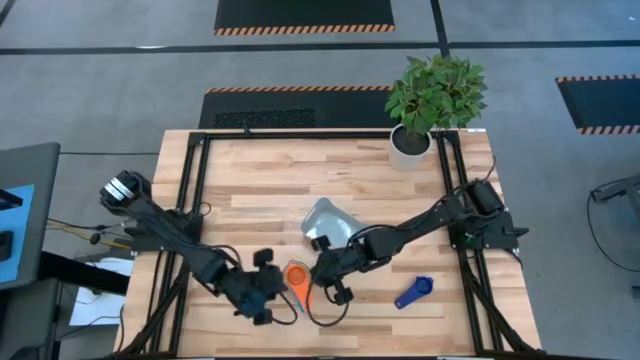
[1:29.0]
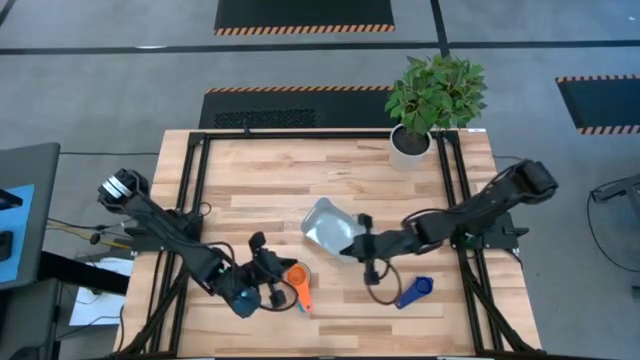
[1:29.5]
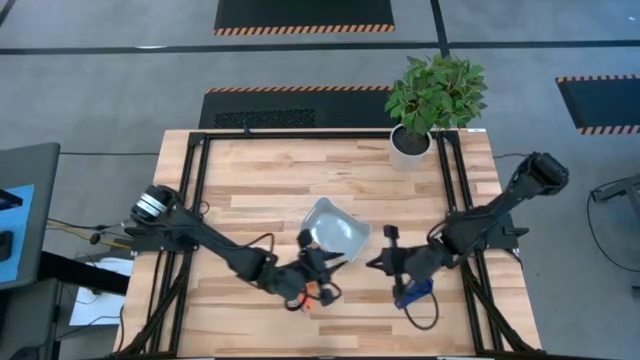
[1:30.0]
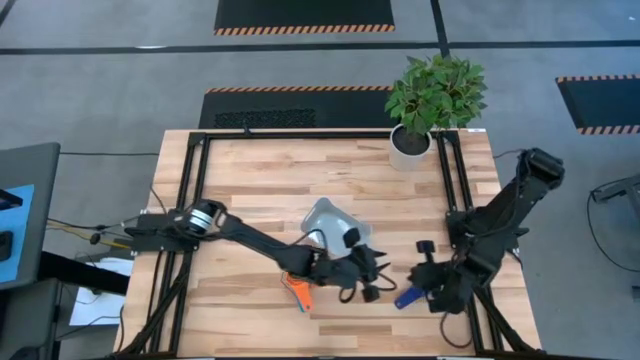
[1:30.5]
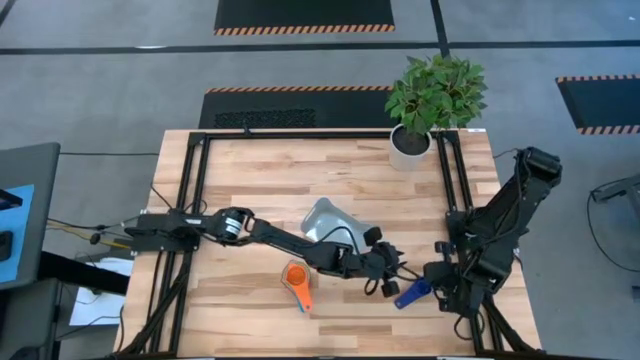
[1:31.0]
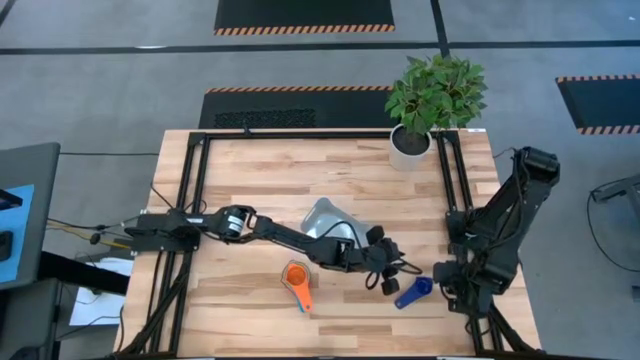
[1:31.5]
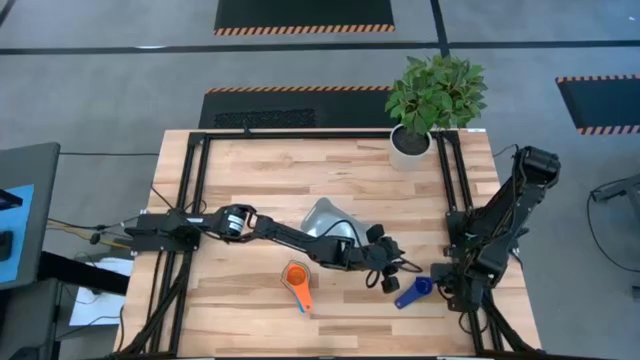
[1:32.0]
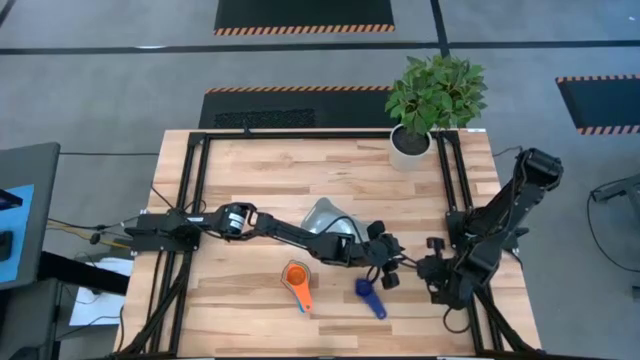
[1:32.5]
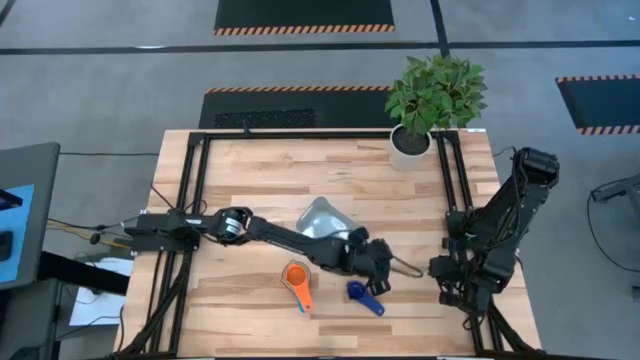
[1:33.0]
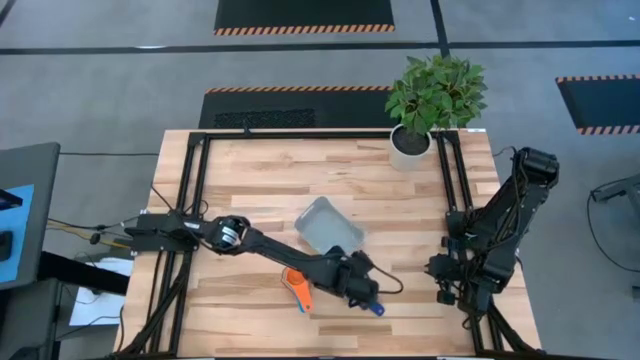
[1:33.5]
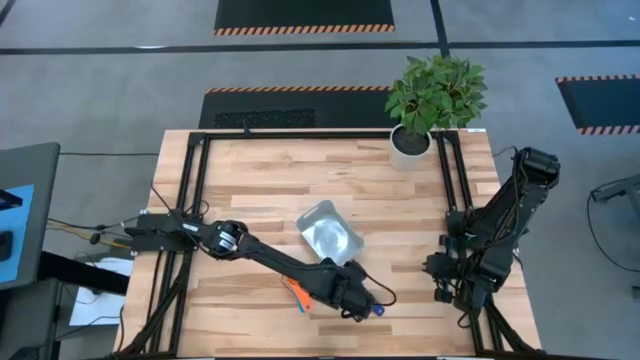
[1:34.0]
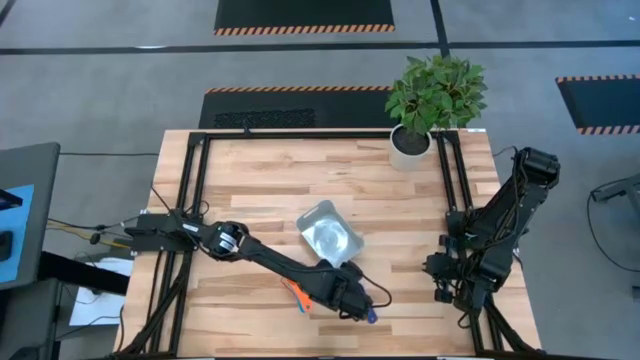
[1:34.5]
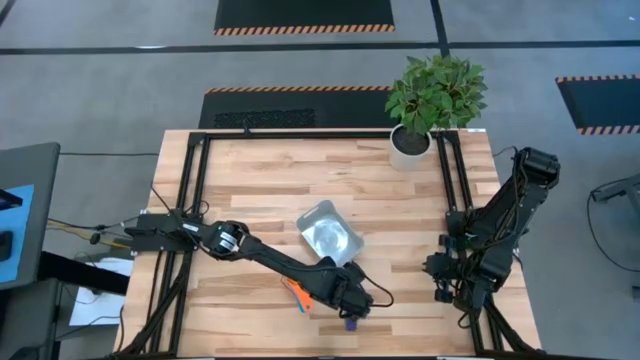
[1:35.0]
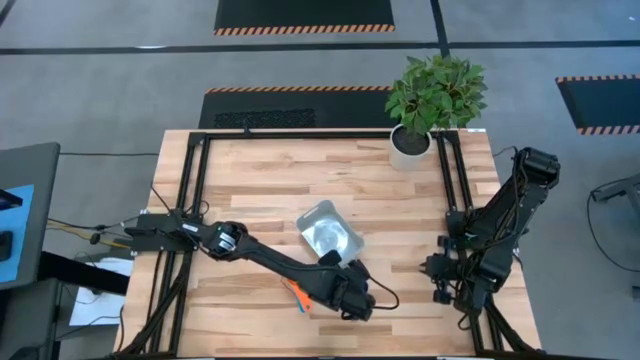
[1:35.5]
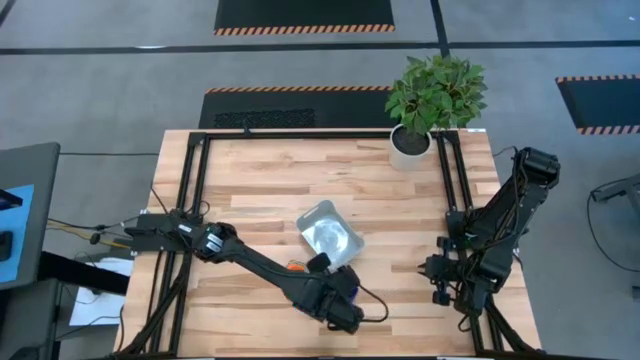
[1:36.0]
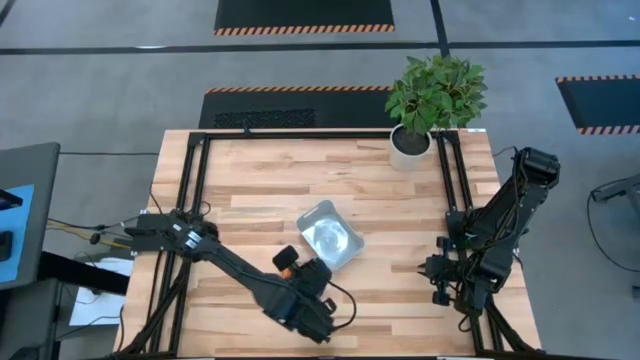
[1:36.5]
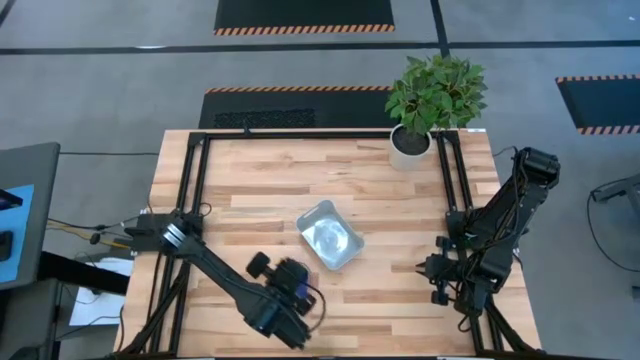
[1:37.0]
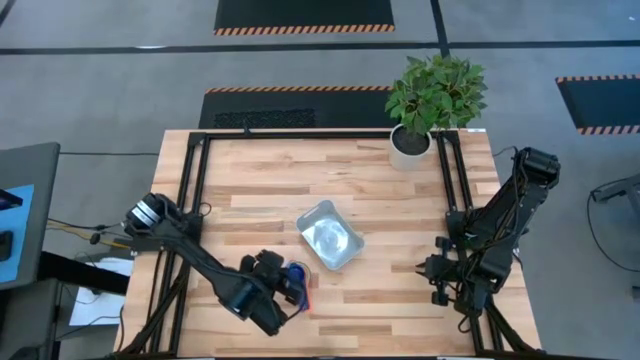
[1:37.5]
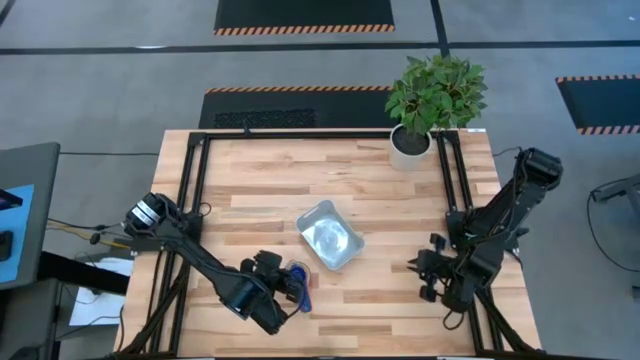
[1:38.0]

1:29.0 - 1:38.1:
Task: Nest measuring cups in basket
Stack the dark blue measuring cup on top of the orange measuring cup

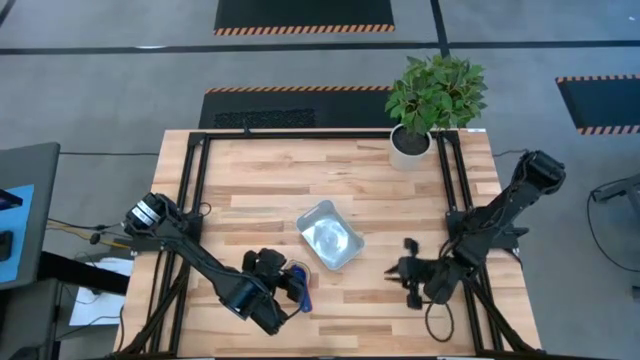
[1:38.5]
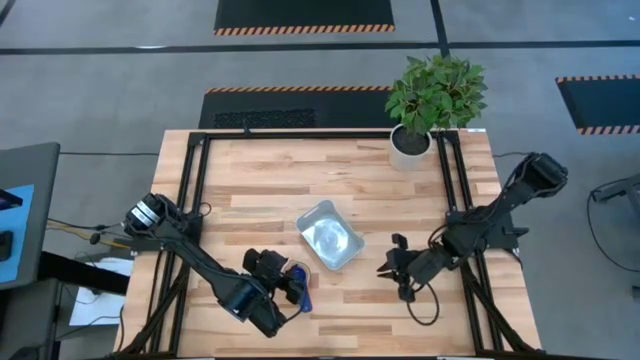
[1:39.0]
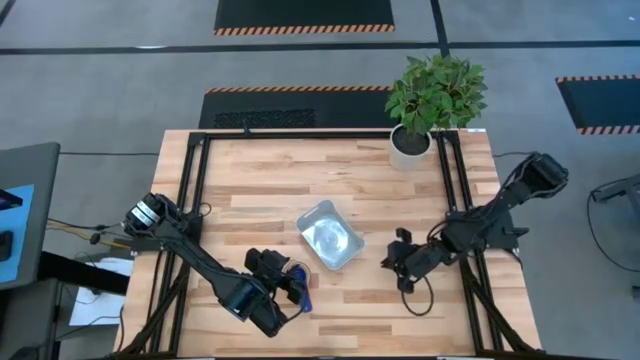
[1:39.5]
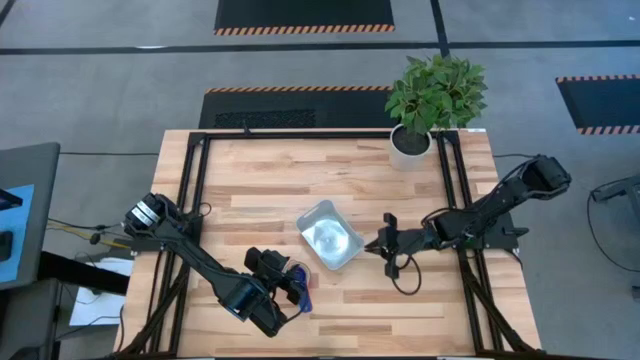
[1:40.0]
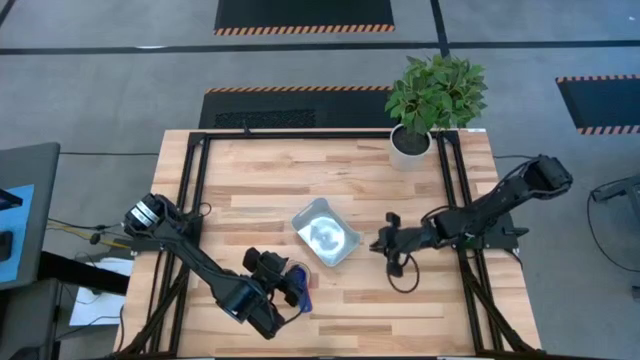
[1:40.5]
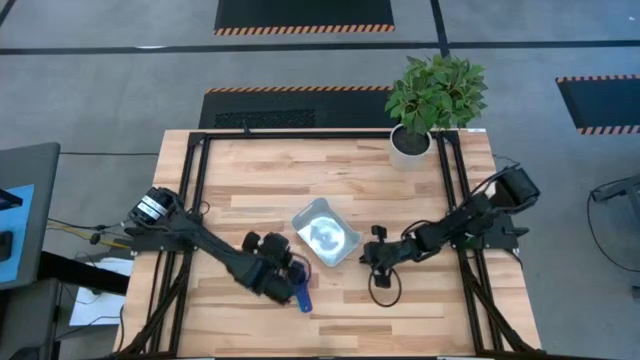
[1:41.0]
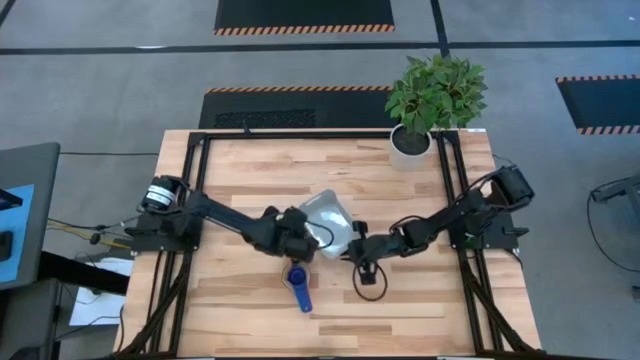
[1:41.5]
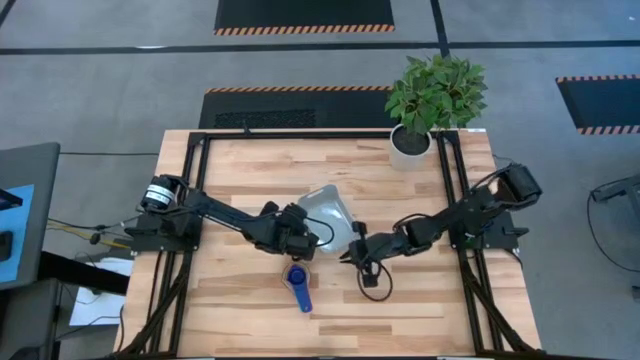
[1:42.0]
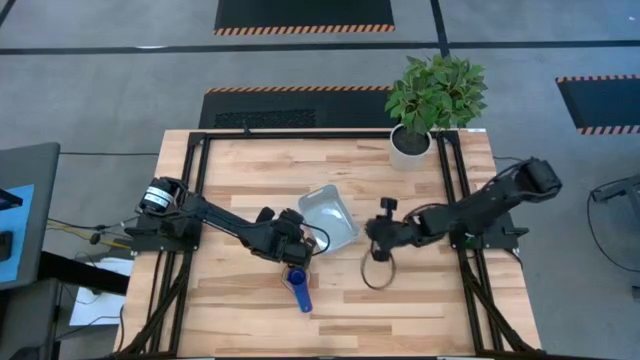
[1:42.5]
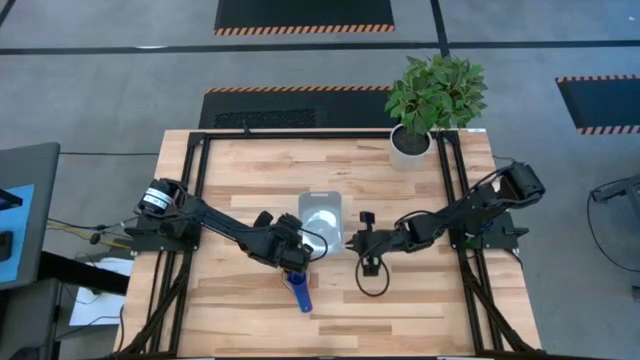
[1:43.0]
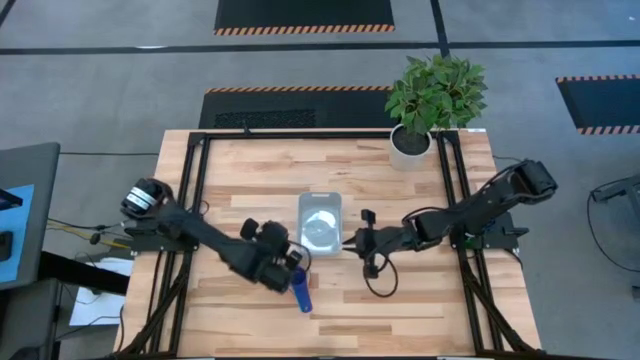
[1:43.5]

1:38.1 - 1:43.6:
Adjust the white bin

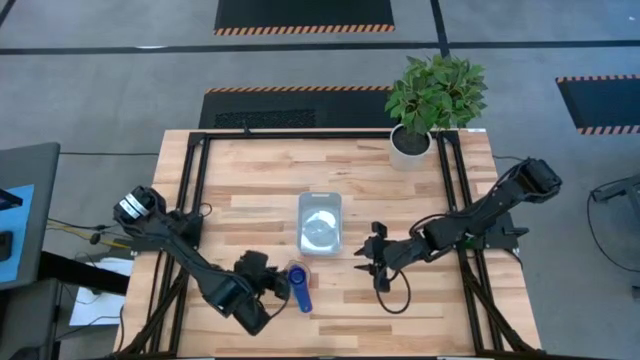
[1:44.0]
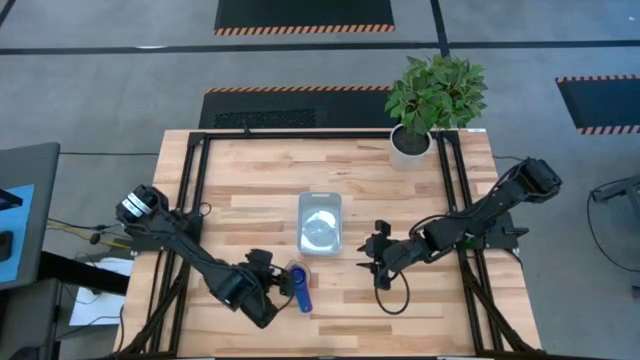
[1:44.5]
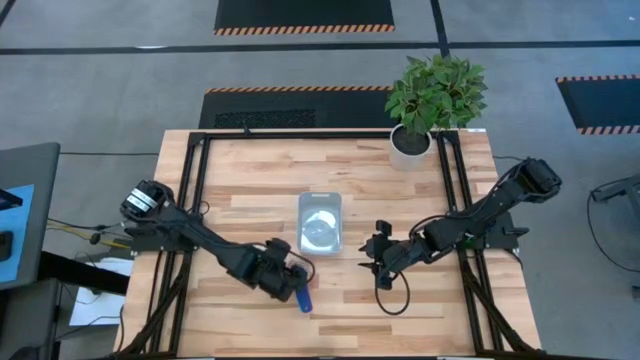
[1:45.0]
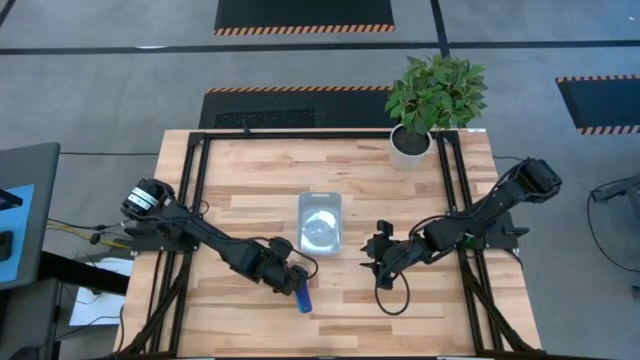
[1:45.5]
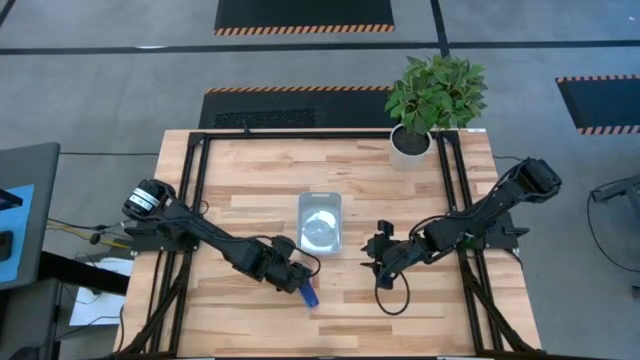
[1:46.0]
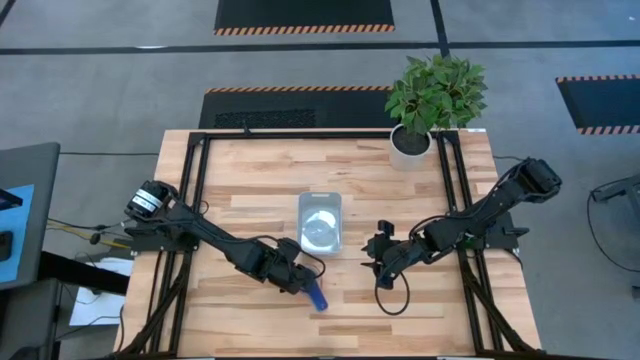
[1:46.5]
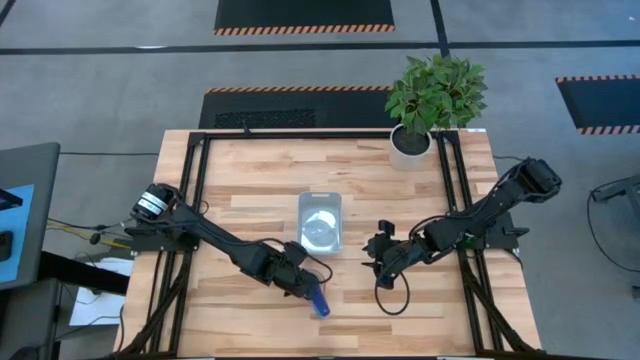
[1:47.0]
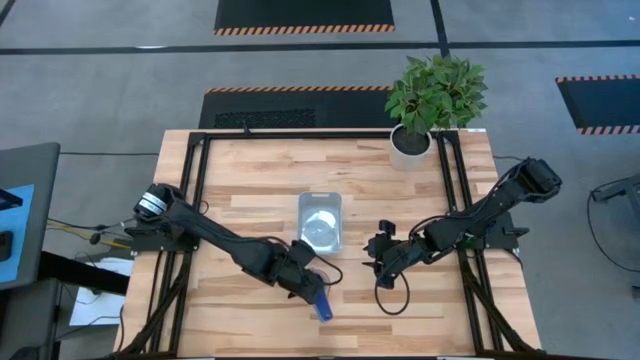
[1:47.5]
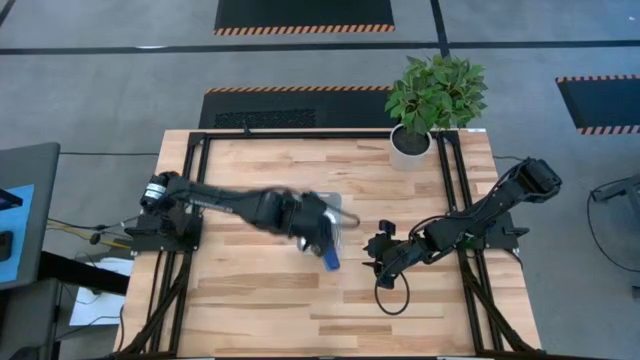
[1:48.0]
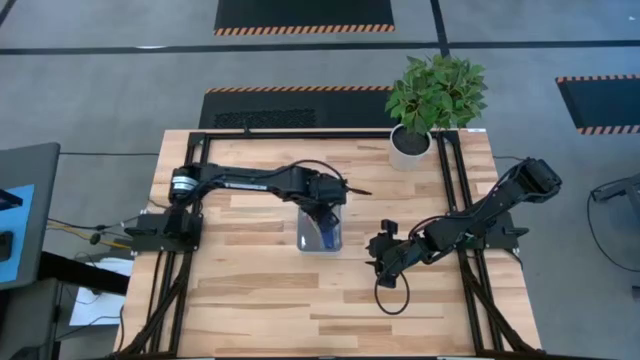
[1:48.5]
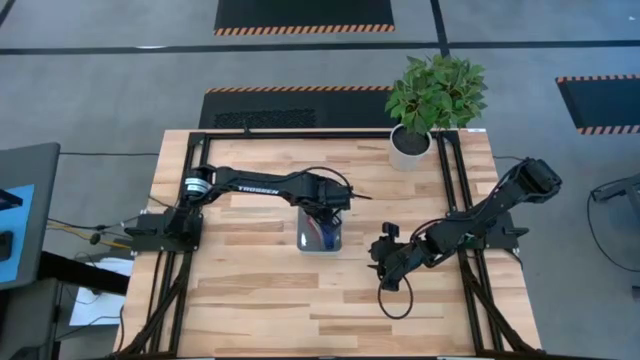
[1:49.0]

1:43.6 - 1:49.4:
Put the nested measuring cups into the white bin

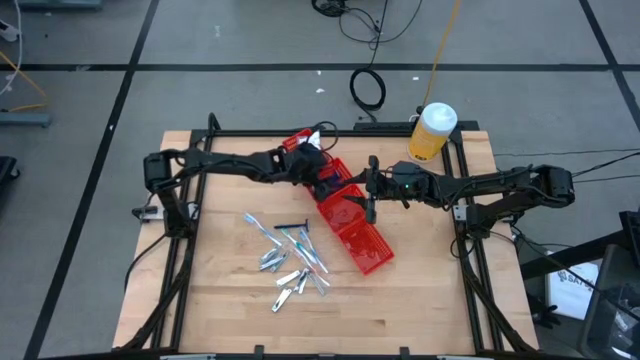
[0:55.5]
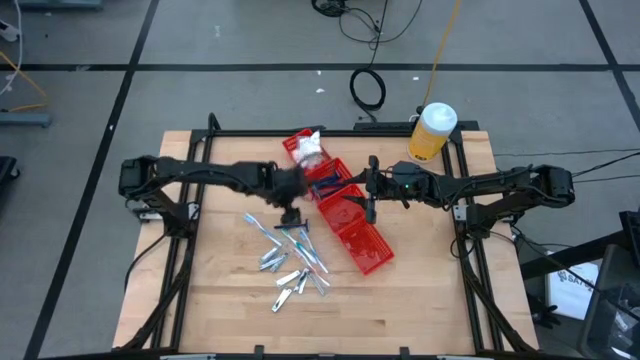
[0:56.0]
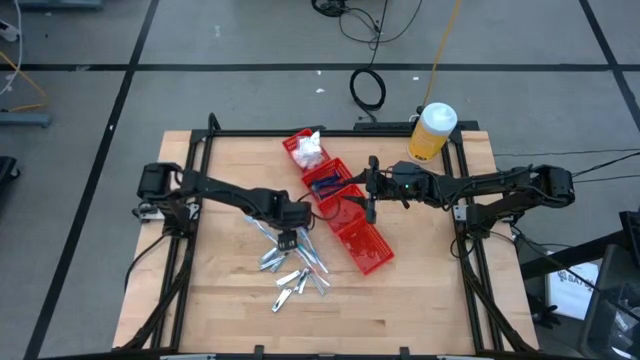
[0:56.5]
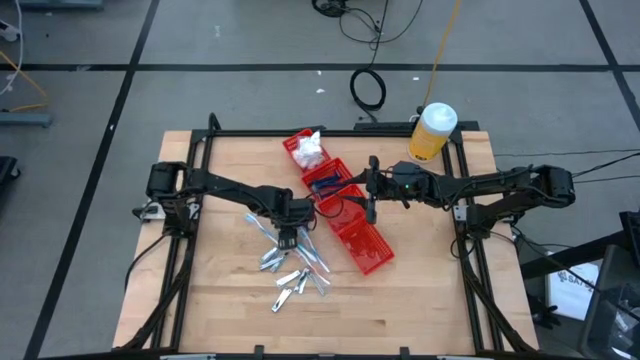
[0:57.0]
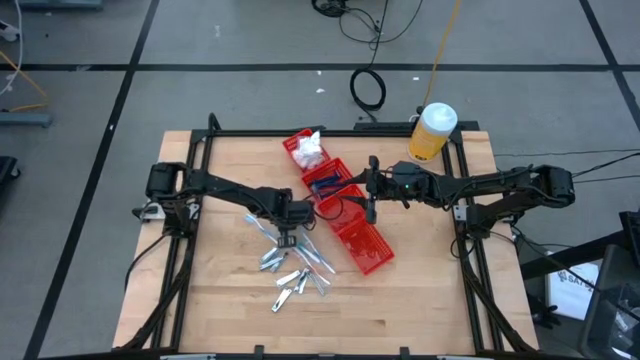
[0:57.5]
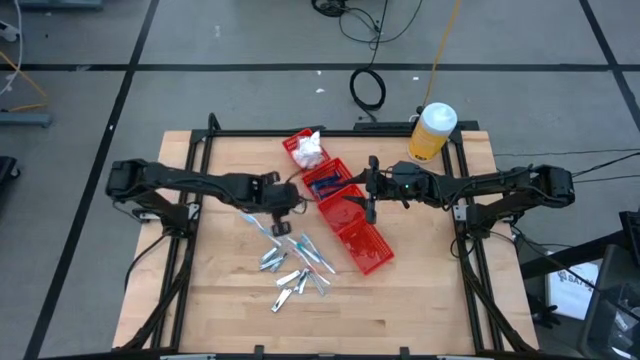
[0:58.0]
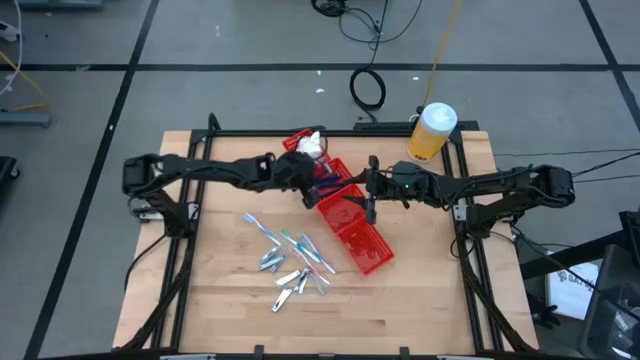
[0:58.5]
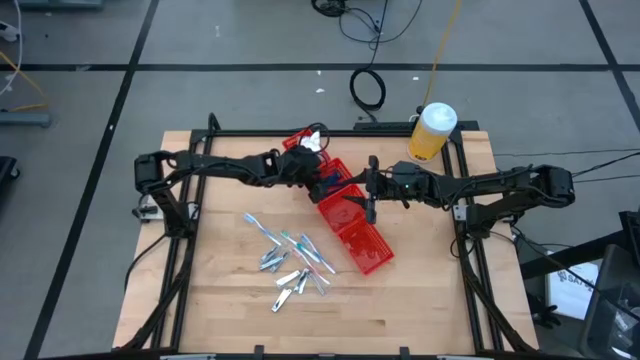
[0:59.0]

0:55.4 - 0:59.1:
Task: Pick & Place Travel size toiletries
Put the blue razor into the top middle red bin
